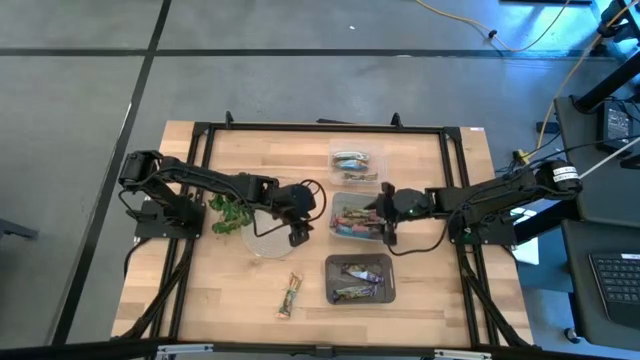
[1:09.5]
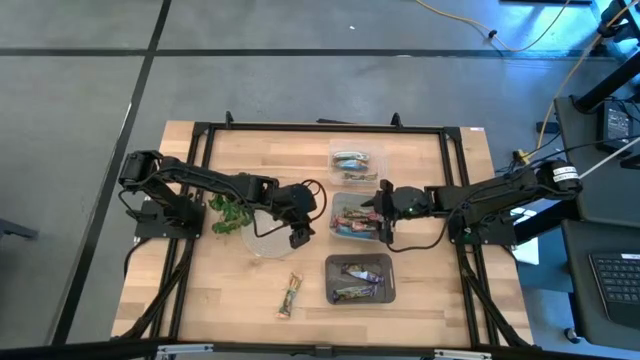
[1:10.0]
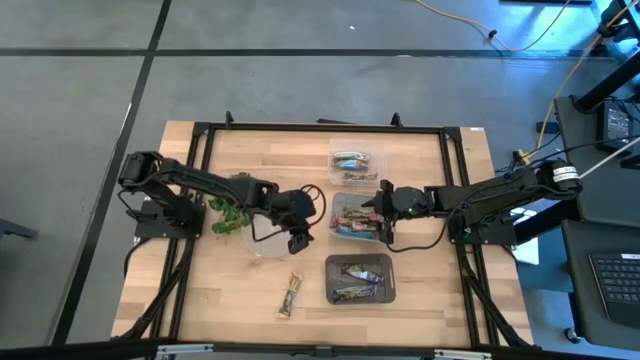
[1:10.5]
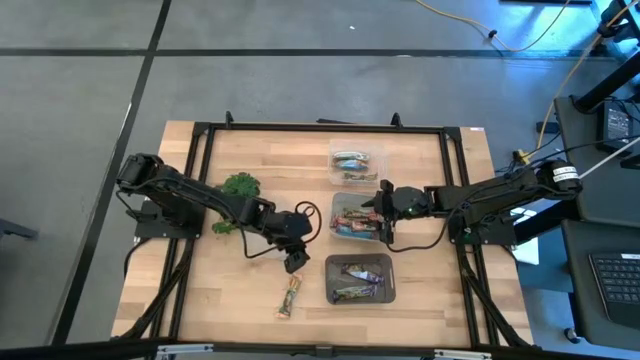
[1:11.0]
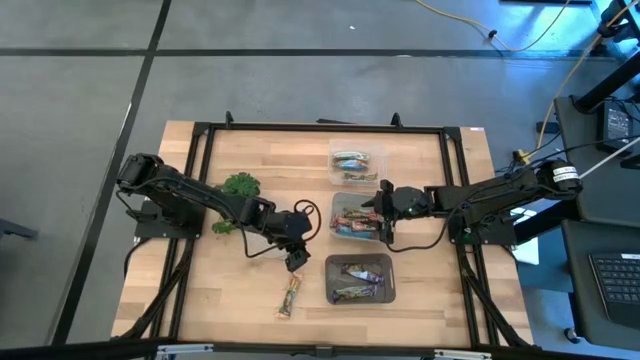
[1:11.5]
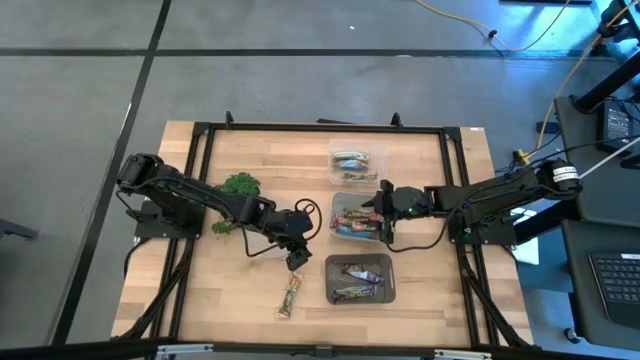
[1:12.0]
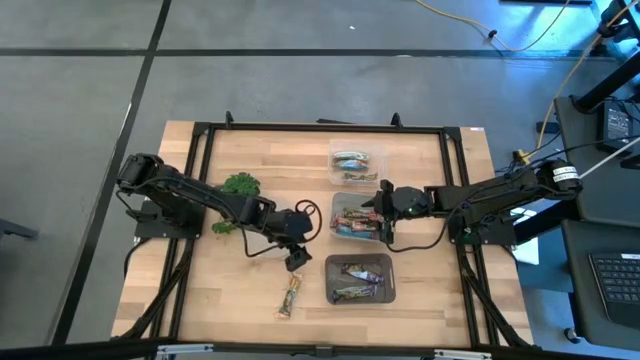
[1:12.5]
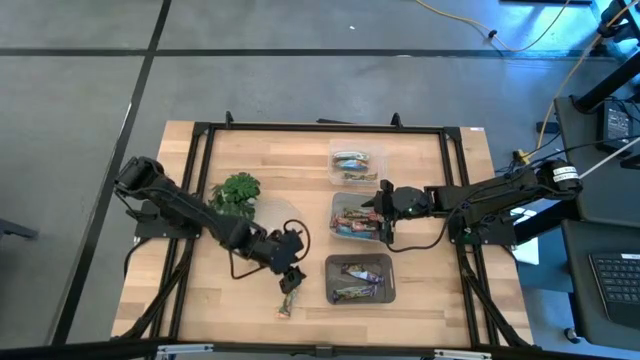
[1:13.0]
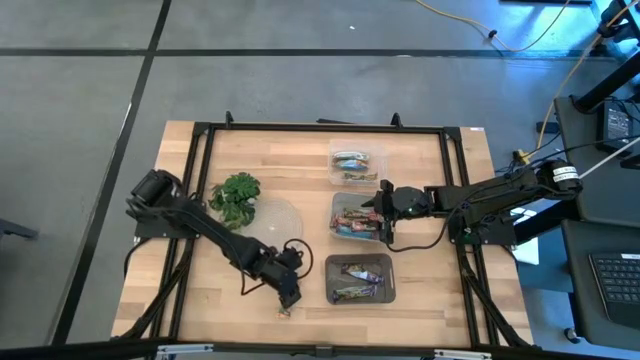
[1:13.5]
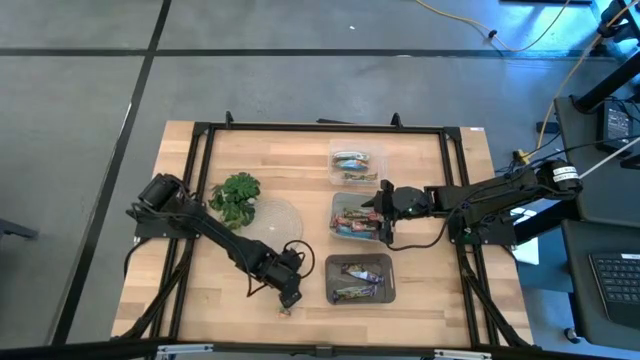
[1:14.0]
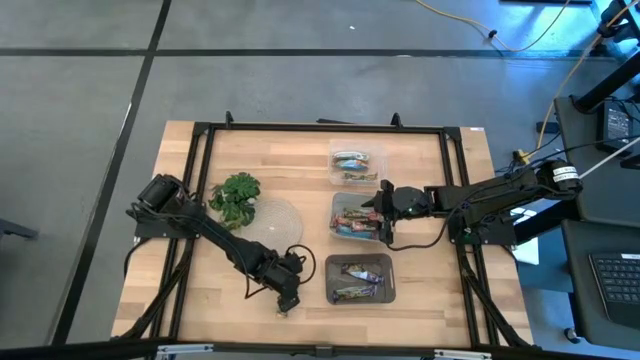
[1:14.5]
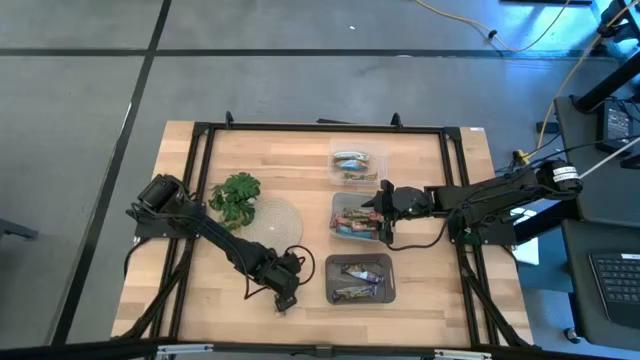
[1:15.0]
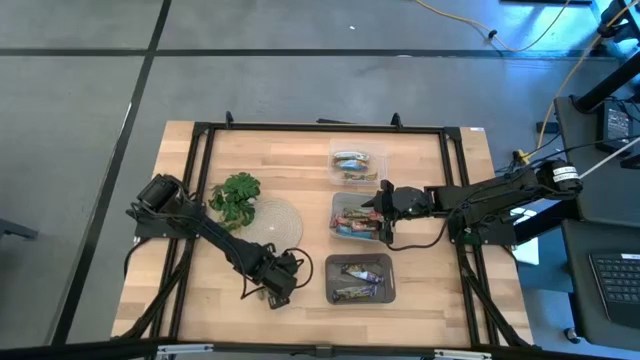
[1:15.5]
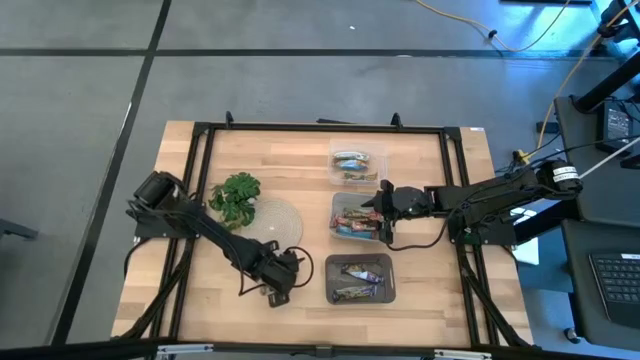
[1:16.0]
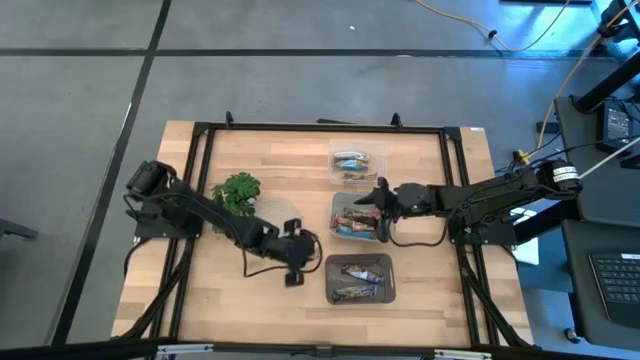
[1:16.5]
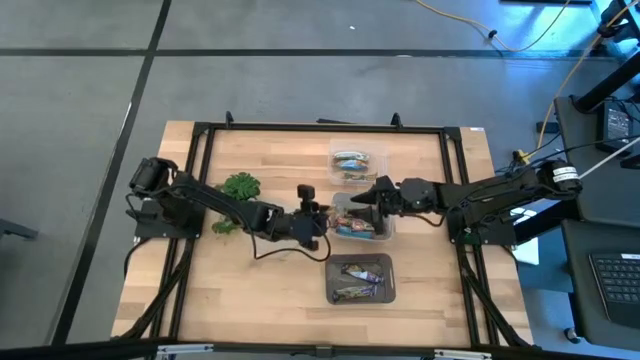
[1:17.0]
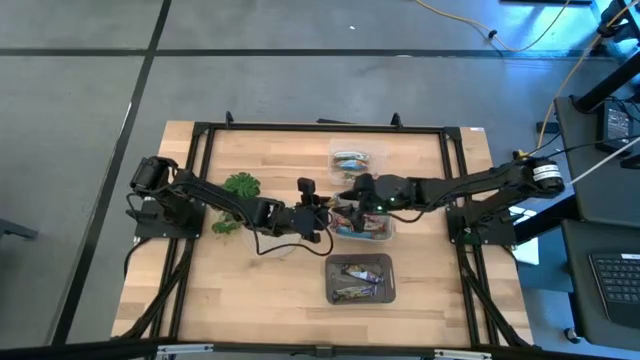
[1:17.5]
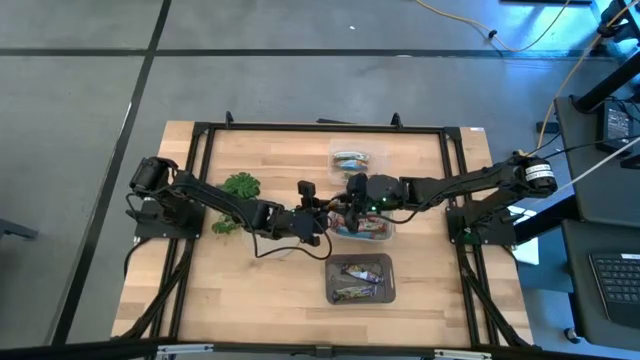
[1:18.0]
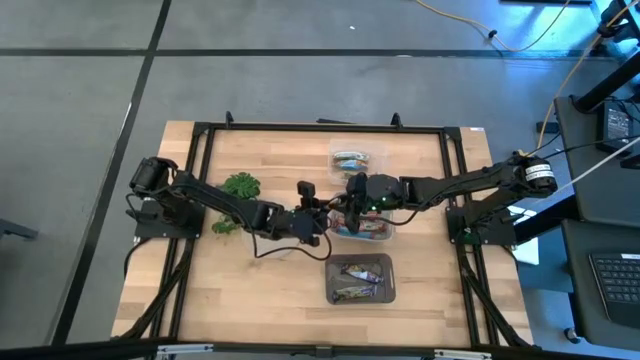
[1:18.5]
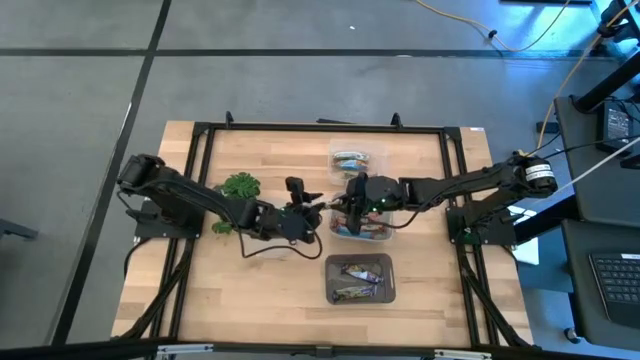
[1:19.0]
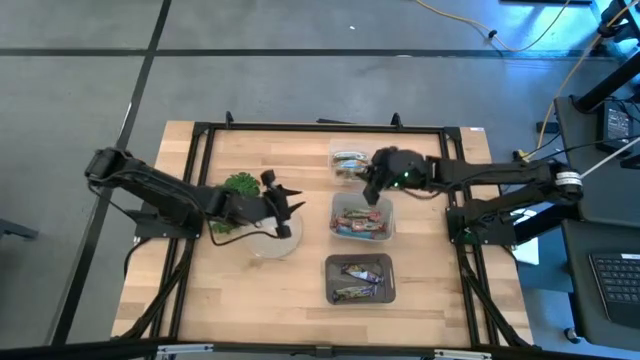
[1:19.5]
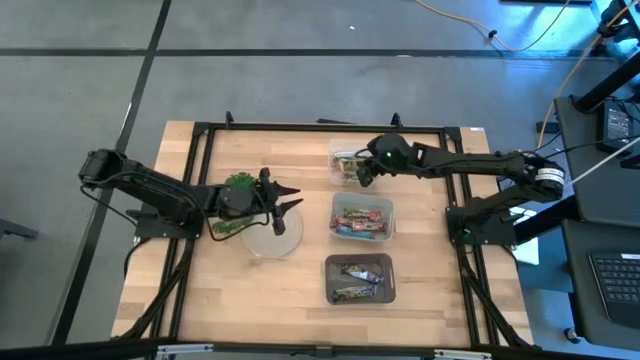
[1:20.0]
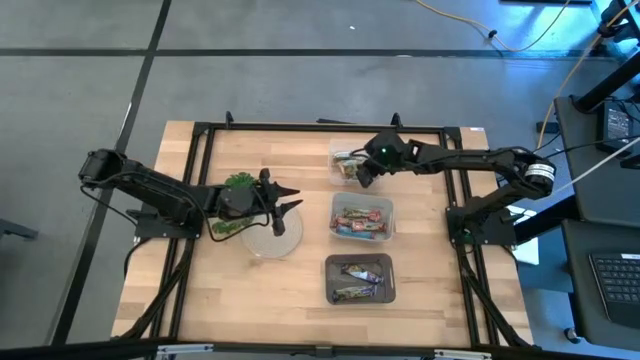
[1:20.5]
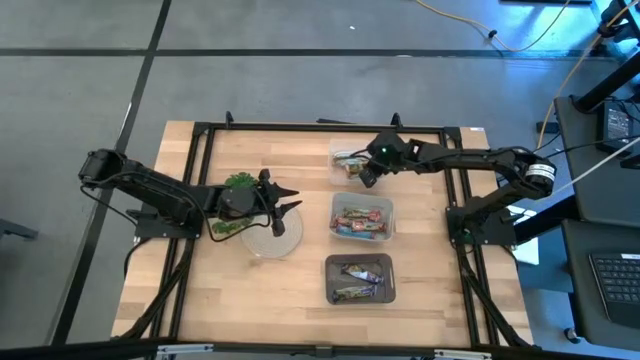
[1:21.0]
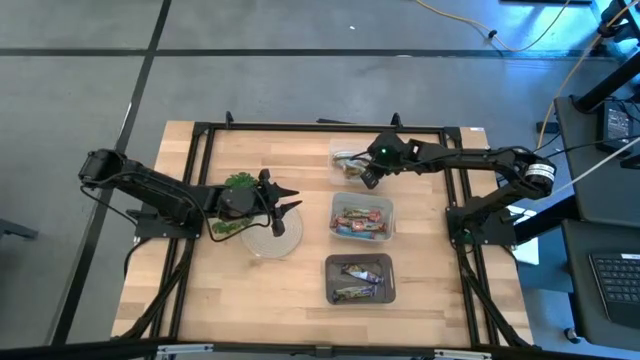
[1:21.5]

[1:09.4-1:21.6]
Task: Pick and place Granola Bars by type
Put the yellow granola bar into the transparent bin

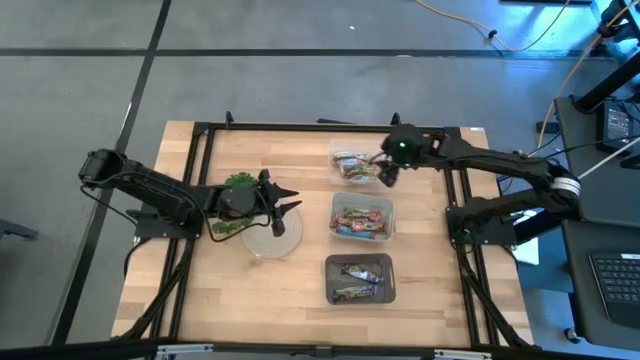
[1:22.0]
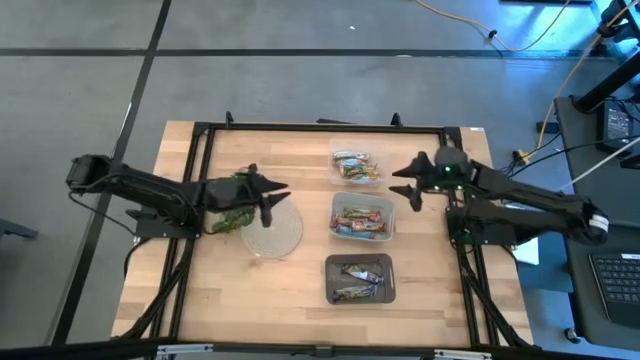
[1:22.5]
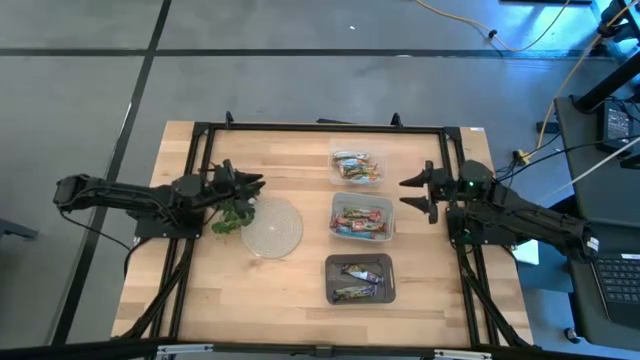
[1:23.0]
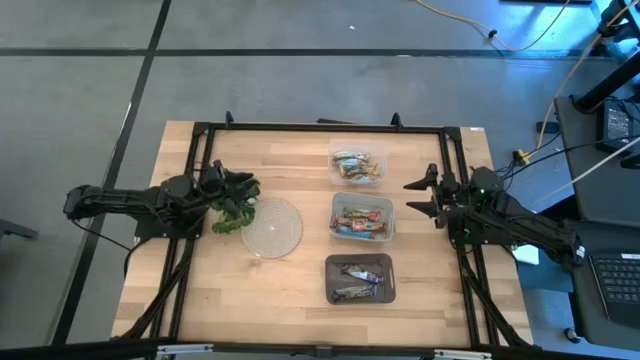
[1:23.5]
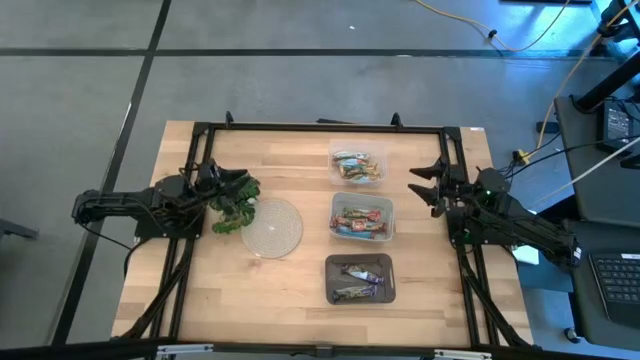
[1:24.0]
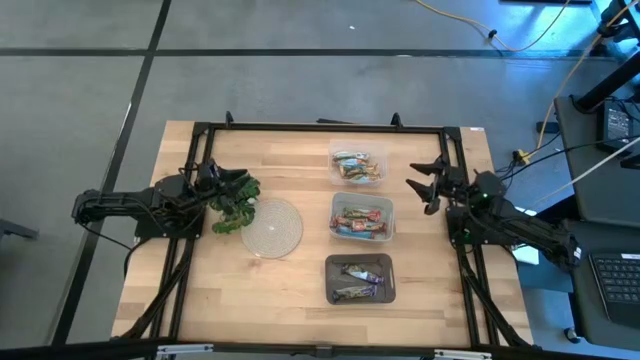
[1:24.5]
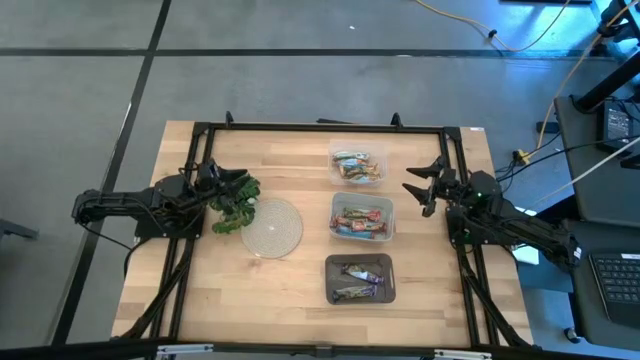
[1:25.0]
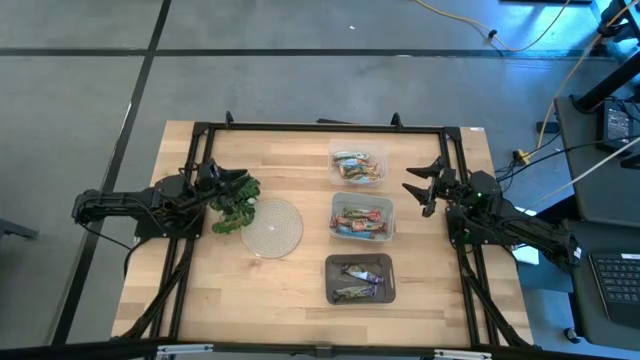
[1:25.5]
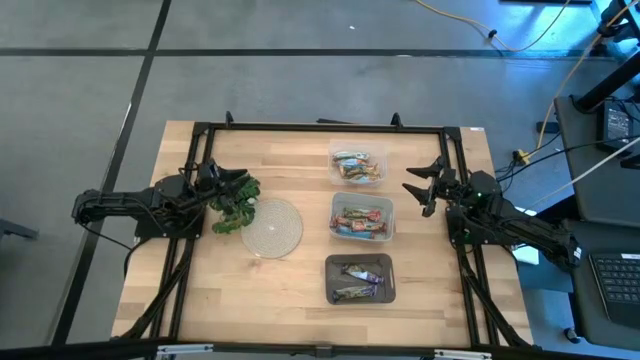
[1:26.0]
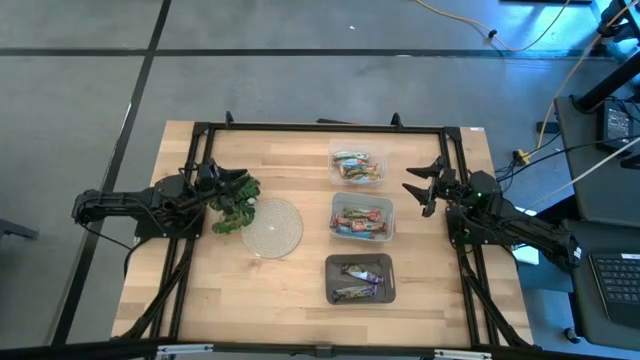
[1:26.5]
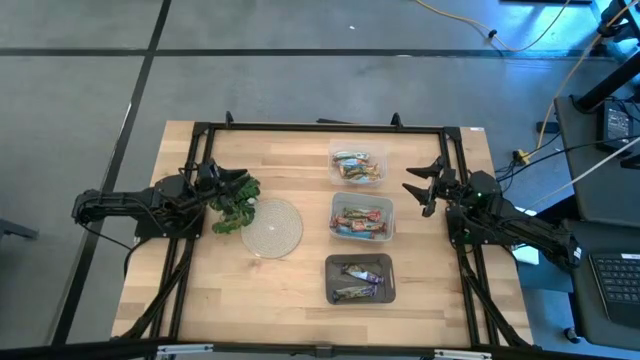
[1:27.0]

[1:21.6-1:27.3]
Return to Home Position

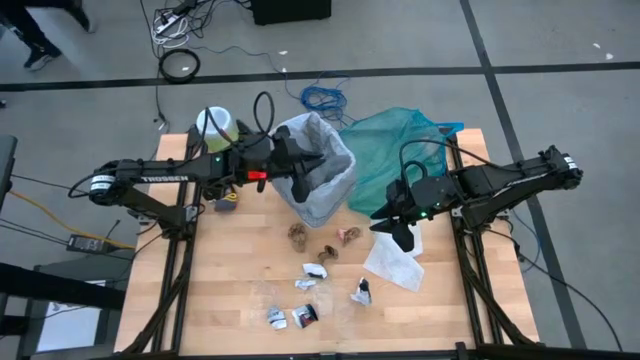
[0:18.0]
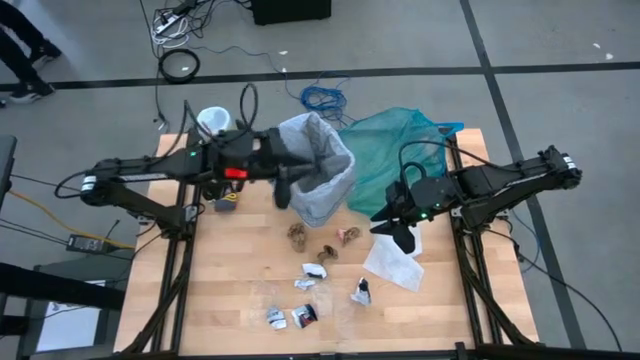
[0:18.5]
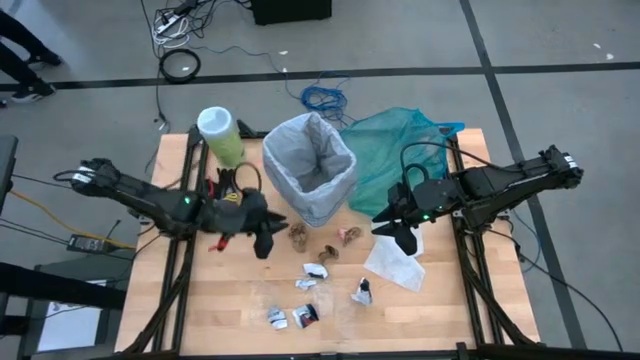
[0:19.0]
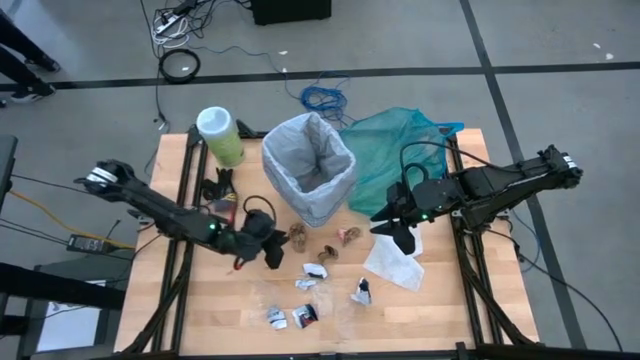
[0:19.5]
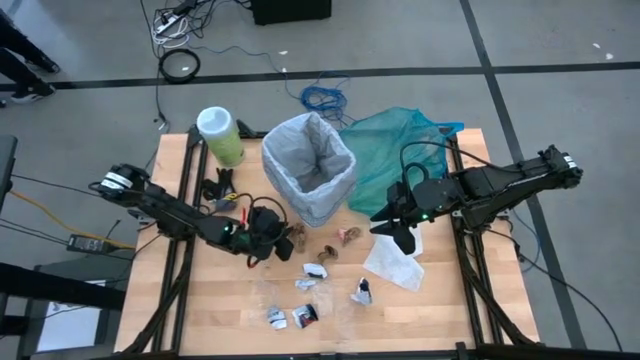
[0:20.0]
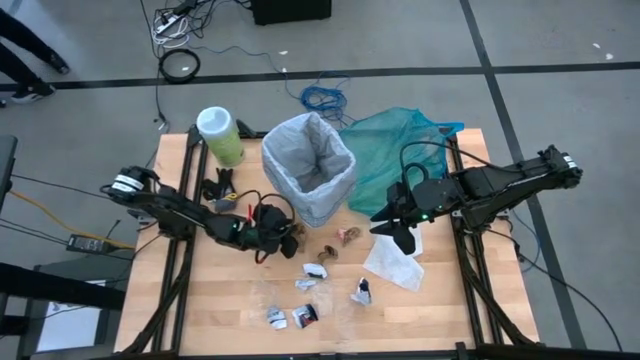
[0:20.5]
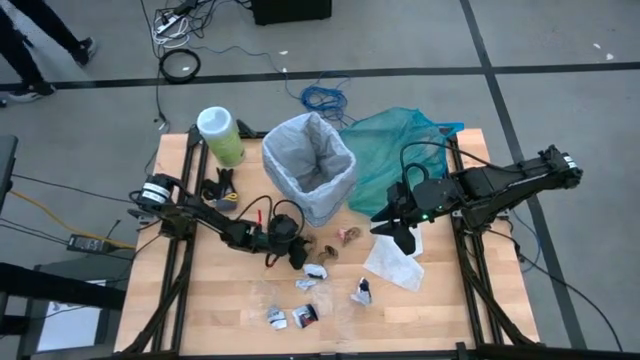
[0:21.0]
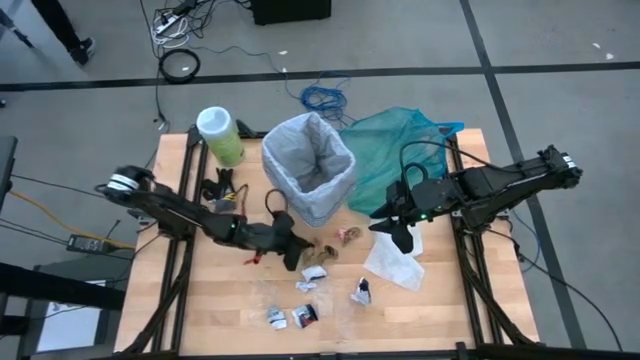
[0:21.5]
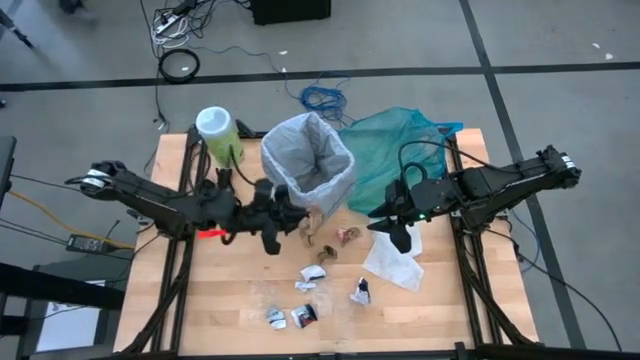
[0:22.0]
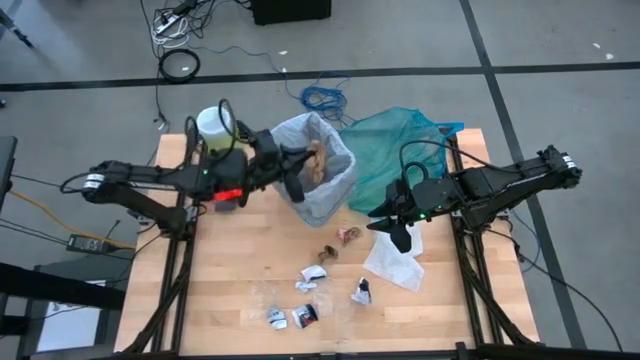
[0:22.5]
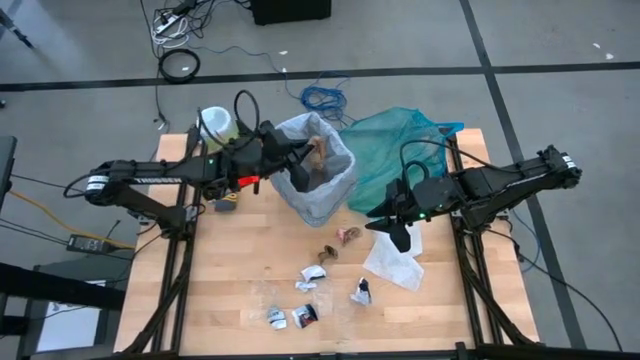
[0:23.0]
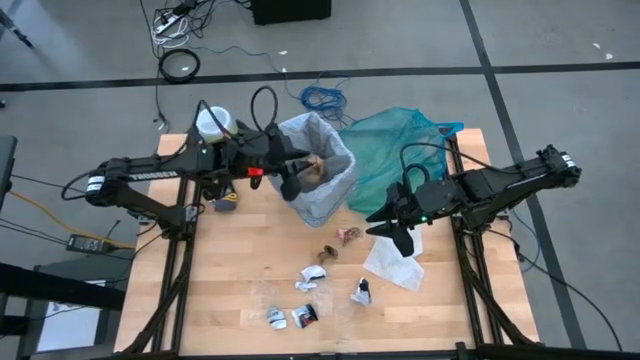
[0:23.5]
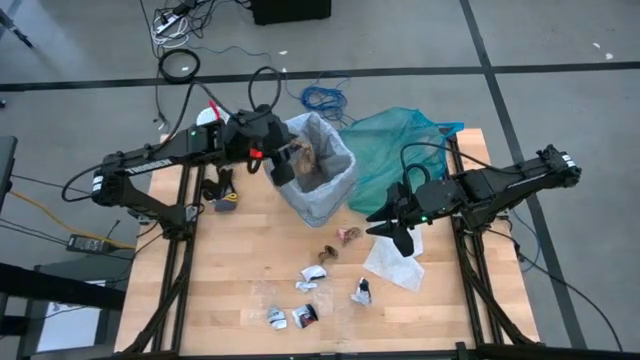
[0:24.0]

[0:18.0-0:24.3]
Task: place trash/remove bag and relplace
Put the brown napkin into the trash bin
